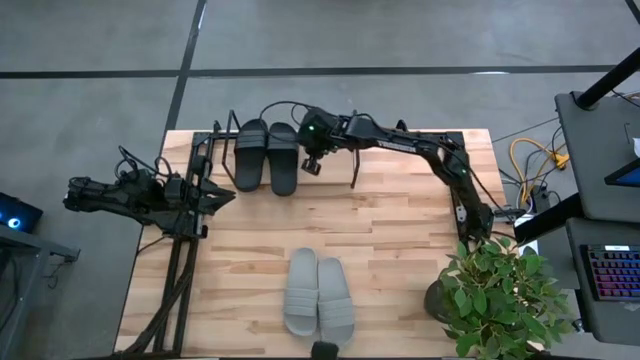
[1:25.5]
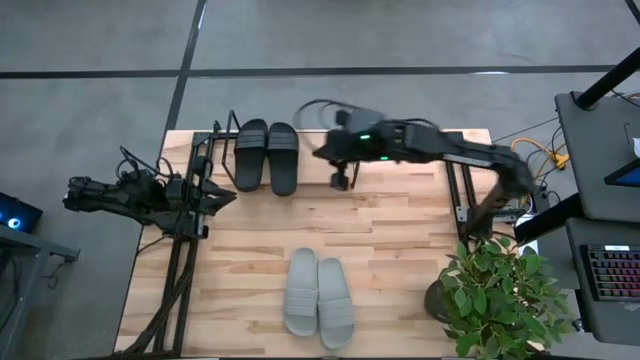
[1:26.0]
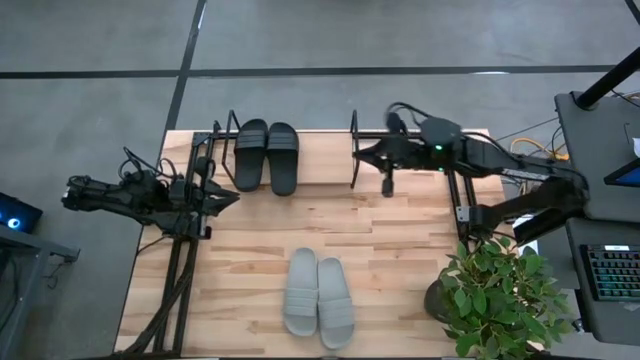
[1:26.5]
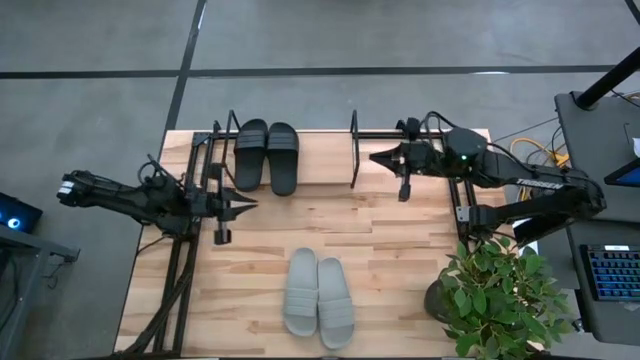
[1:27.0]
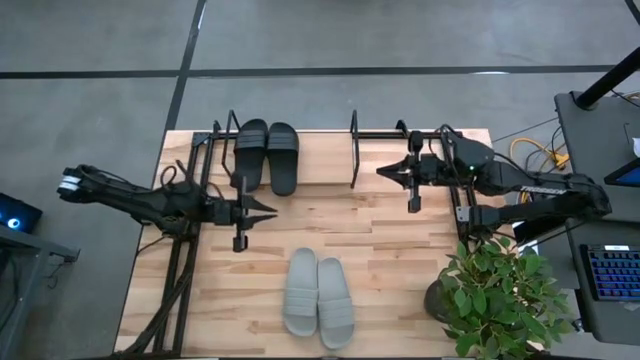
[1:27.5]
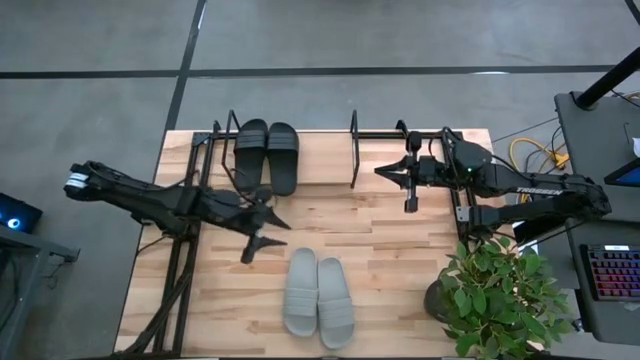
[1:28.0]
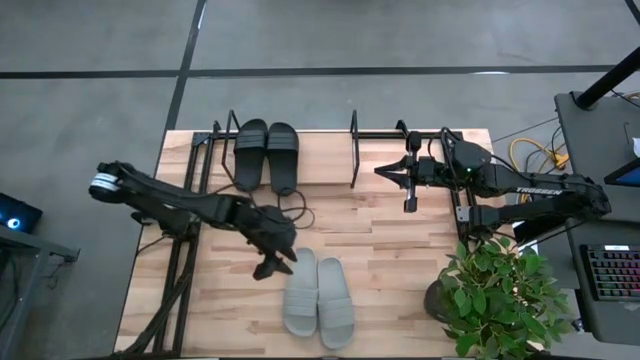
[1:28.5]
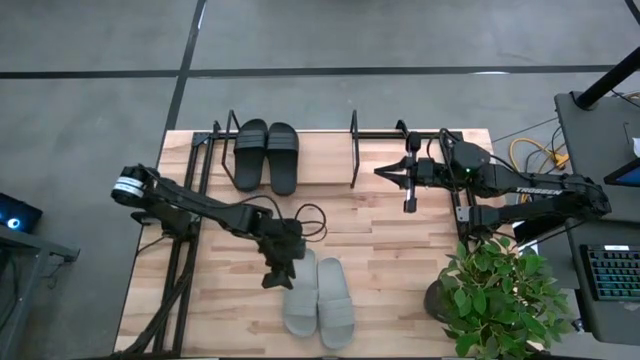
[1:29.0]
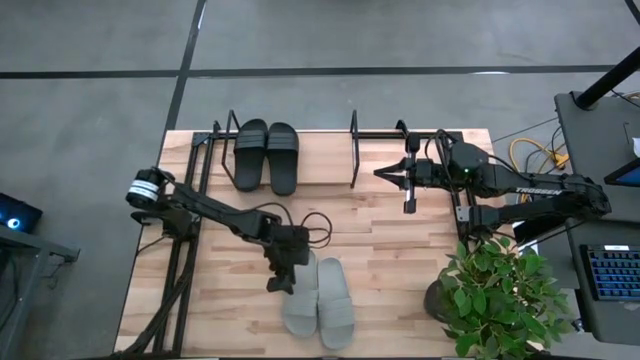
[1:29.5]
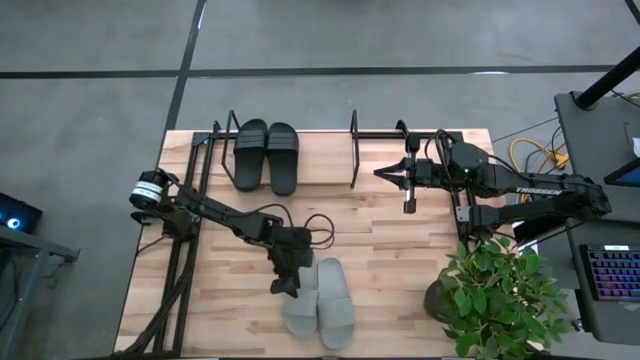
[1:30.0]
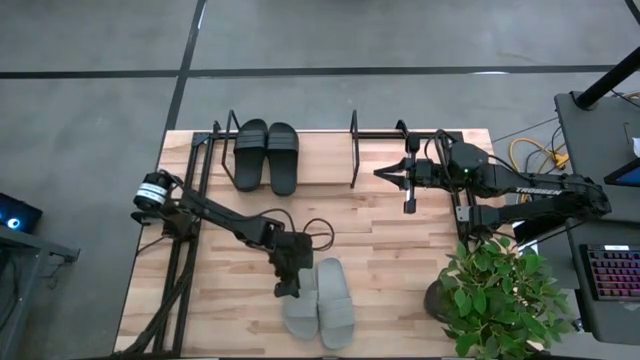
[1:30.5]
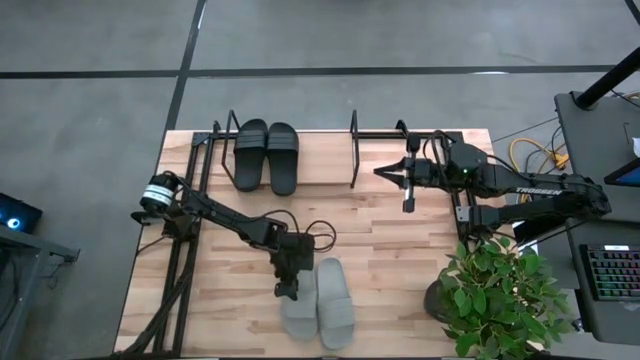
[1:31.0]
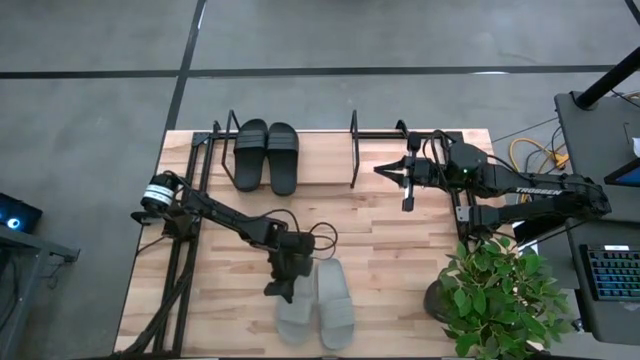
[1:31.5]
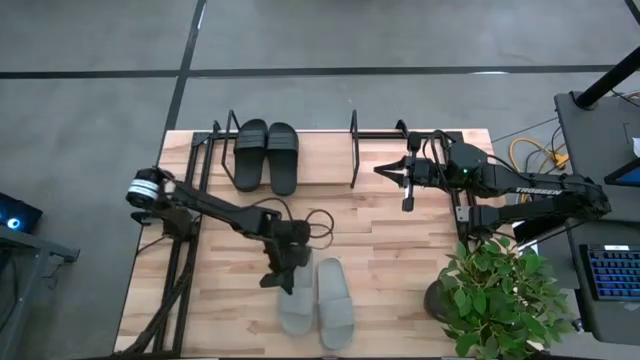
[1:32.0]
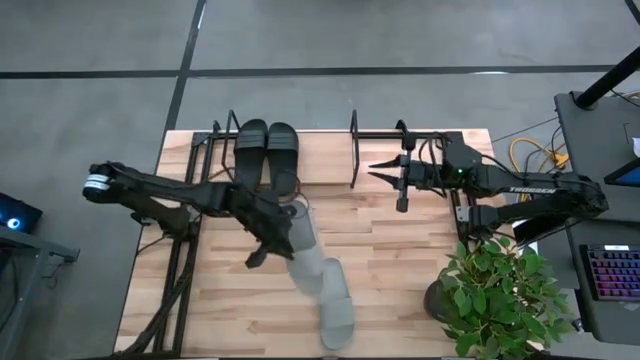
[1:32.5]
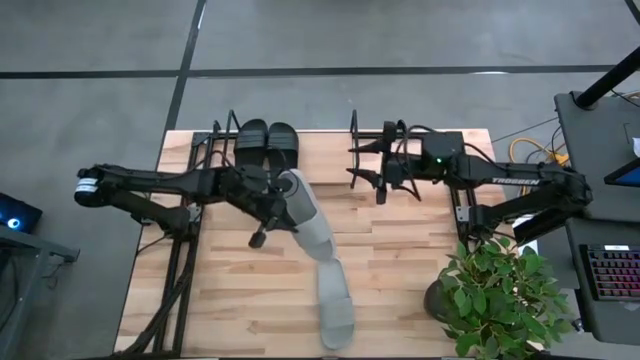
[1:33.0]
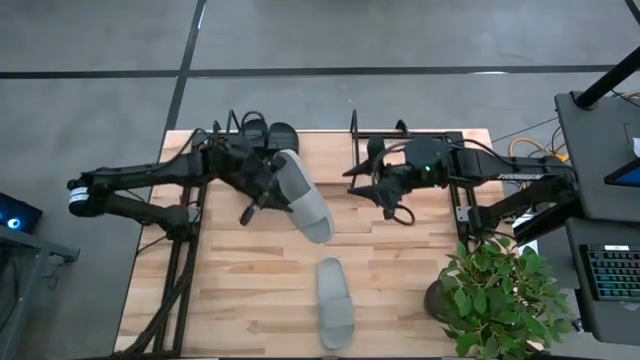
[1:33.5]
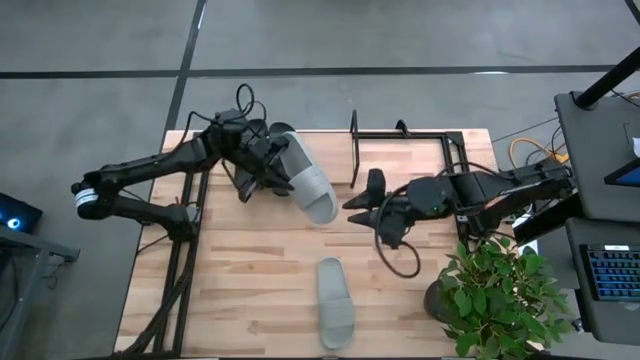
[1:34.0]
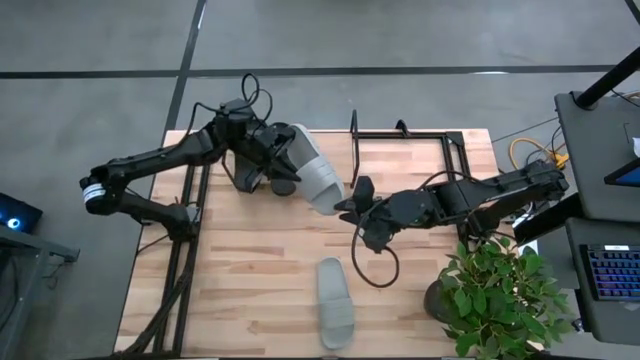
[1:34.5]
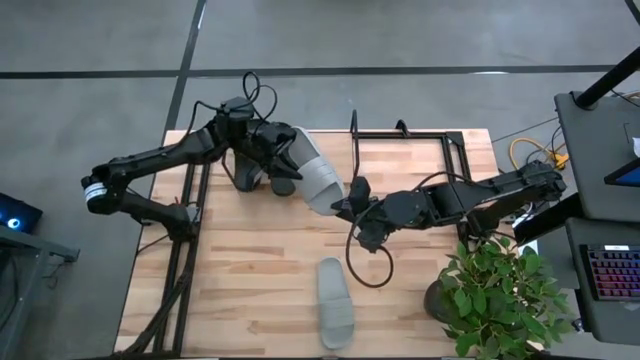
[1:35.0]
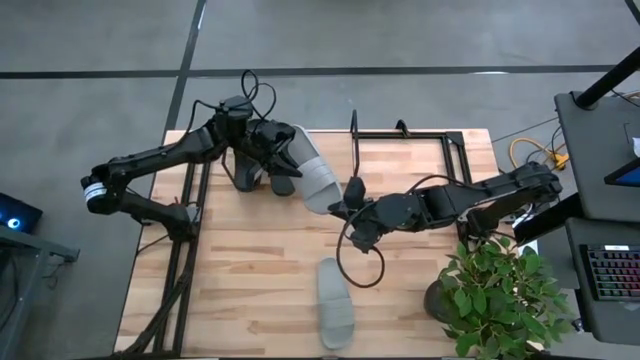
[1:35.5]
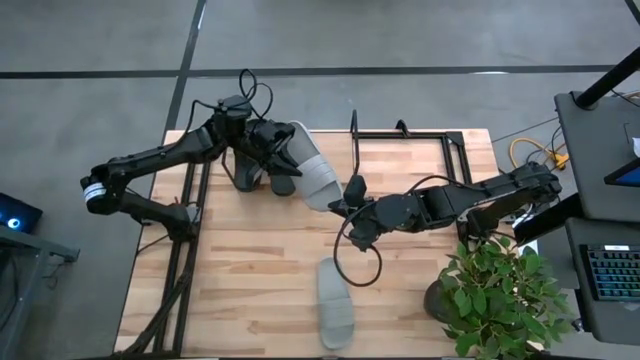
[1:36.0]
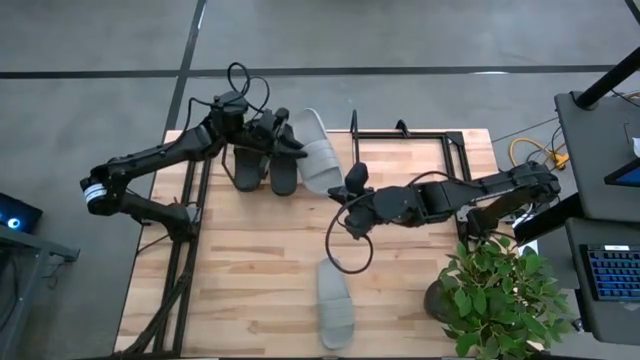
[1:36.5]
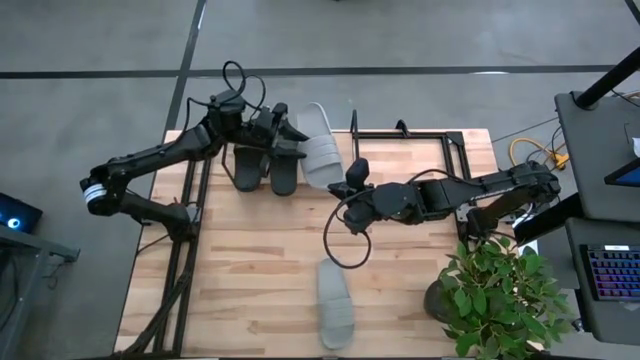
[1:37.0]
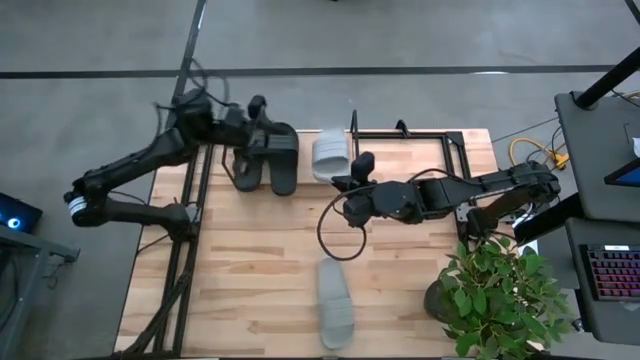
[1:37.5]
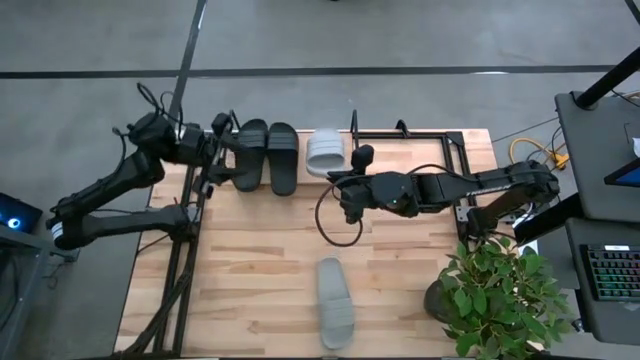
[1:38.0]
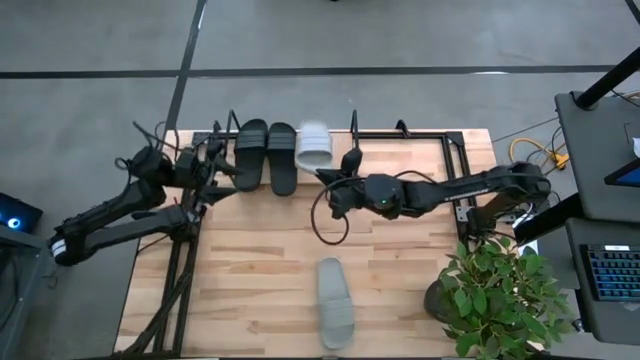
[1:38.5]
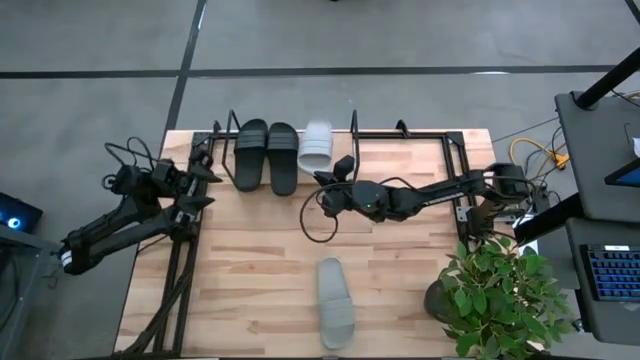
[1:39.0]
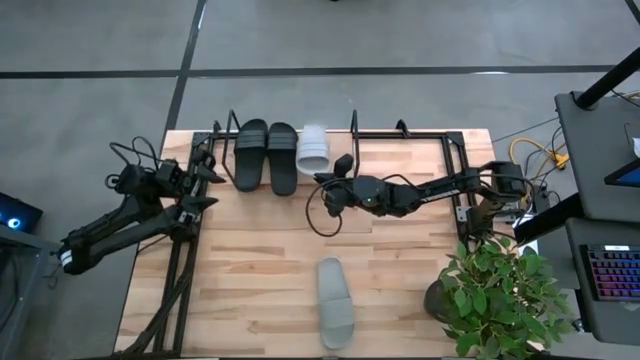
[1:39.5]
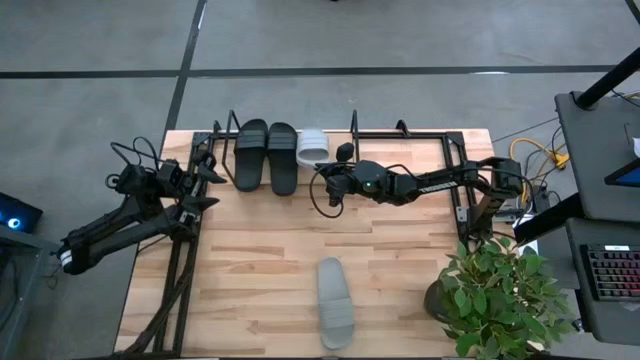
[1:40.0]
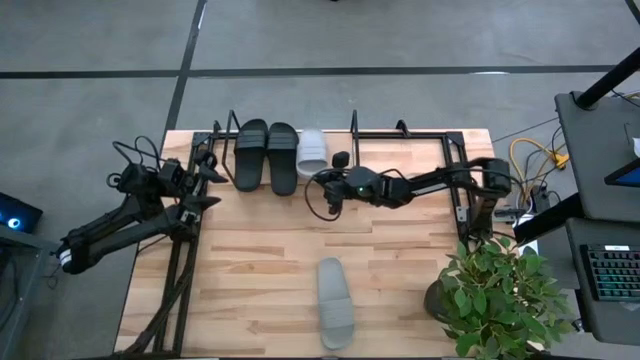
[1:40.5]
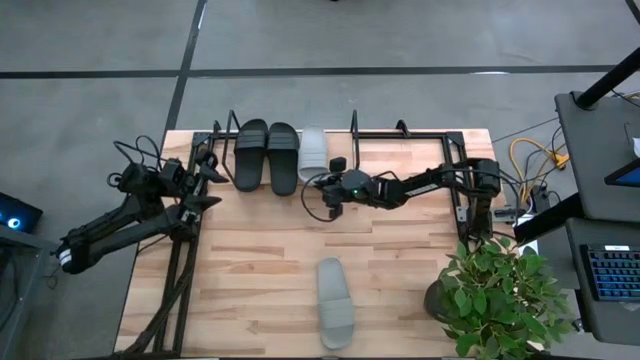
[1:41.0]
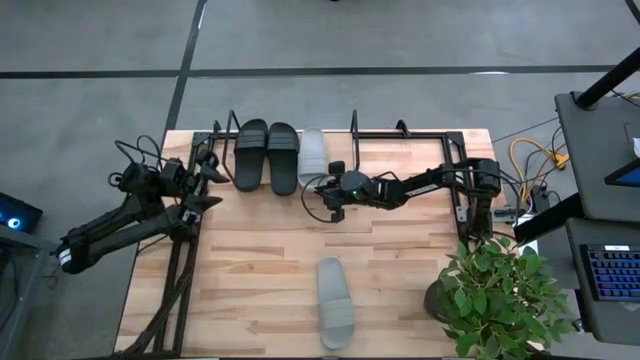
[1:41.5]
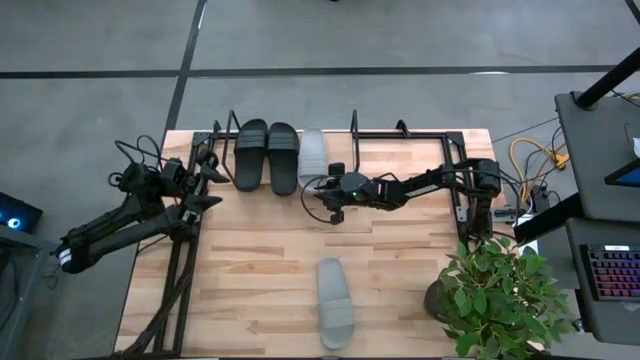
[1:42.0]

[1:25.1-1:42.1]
Task: Pick and place slides into the shelf
Put the left gray slide on the shelf

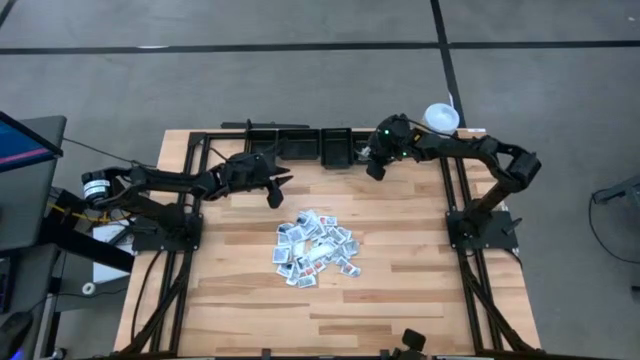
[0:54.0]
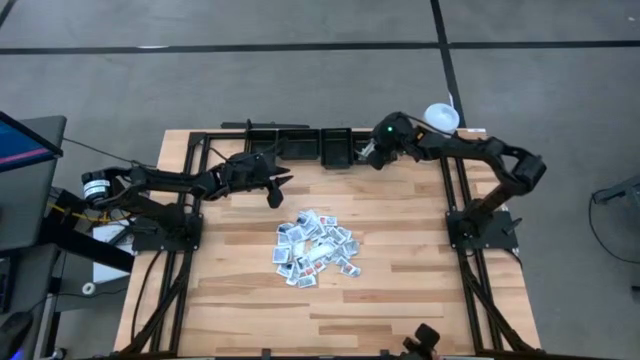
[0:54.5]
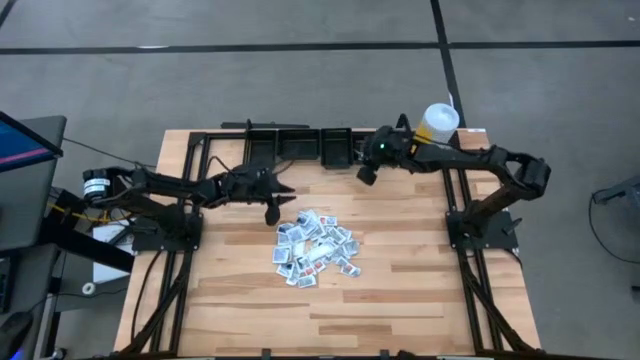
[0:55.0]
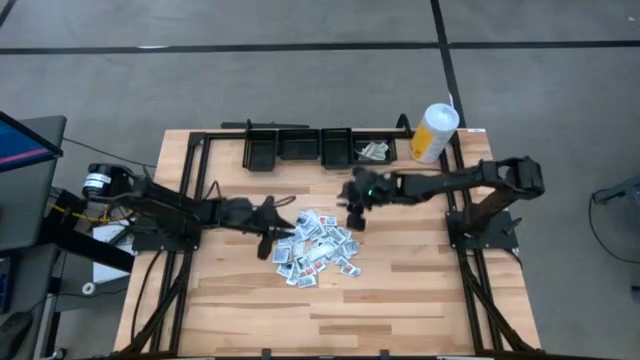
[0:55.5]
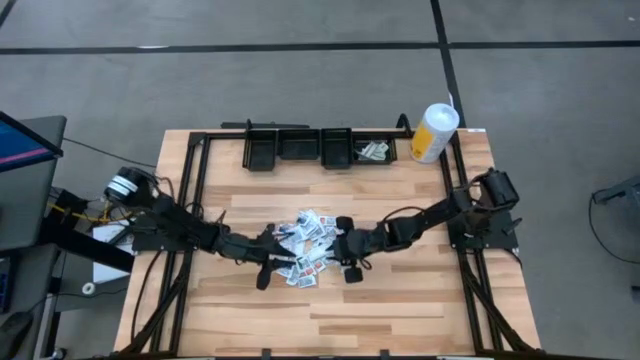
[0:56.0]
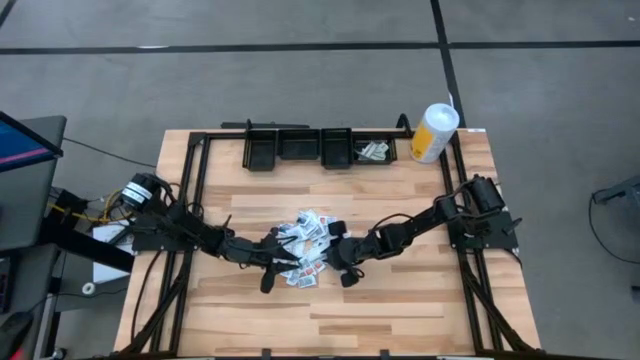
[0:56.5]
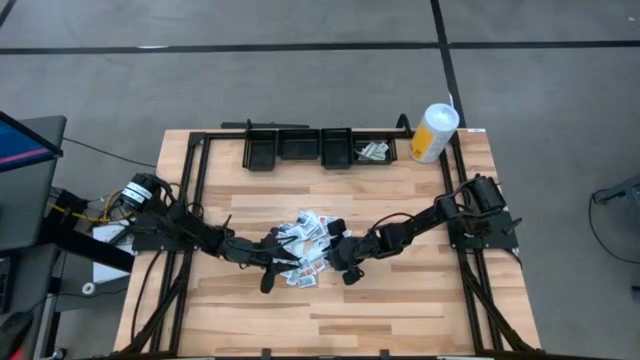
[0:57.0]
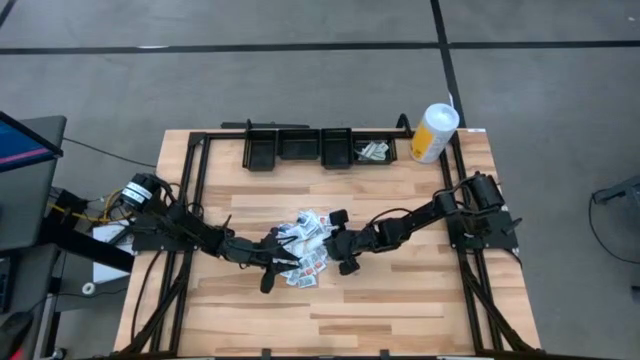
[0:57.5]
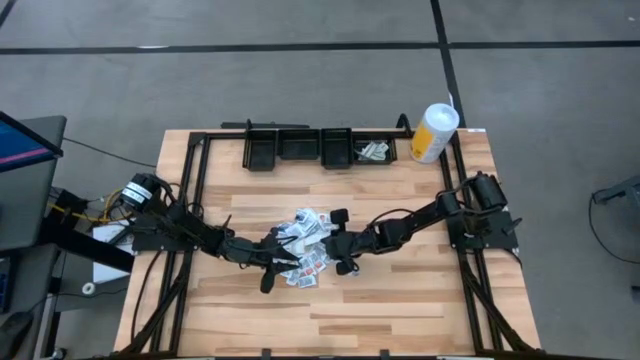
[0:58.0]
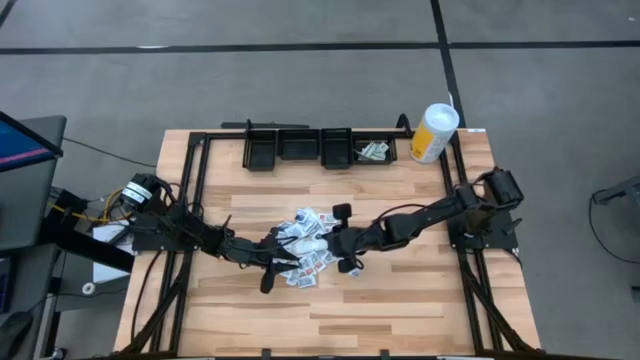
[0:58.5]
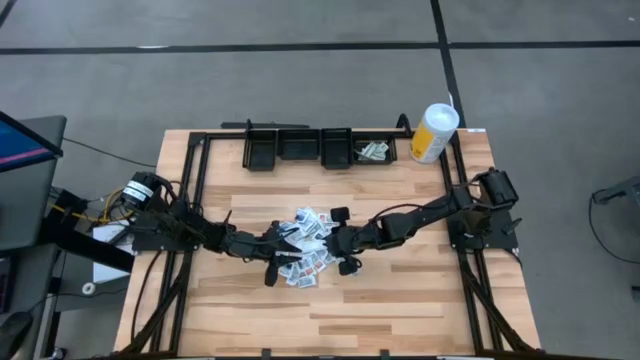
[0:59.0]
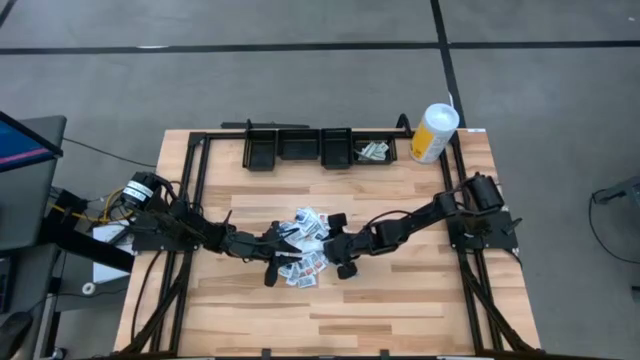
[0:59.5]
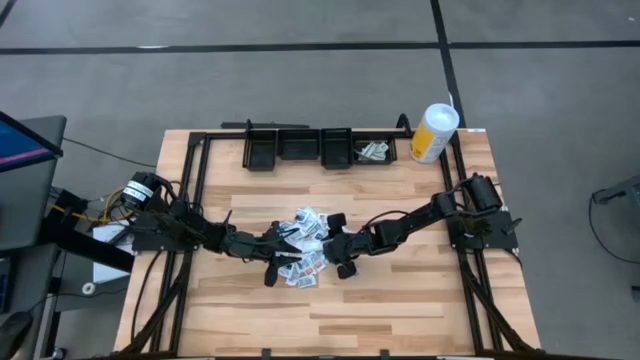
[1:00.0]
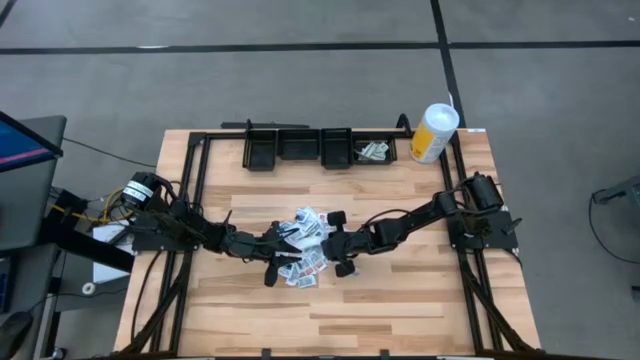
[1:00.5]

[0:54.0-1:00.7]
Task: Pick & Place First Aid Supplies
Put the green bandage pack into the right black bin
